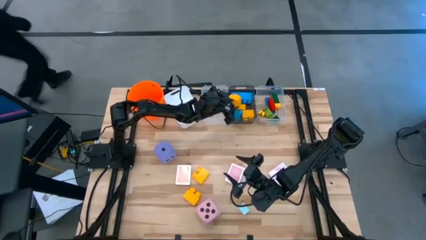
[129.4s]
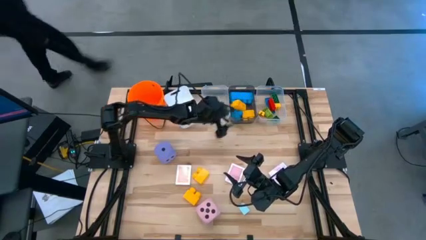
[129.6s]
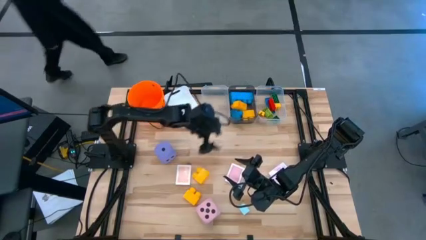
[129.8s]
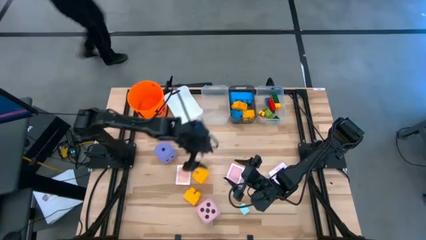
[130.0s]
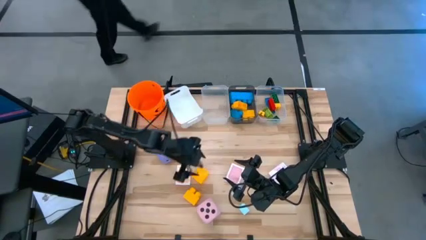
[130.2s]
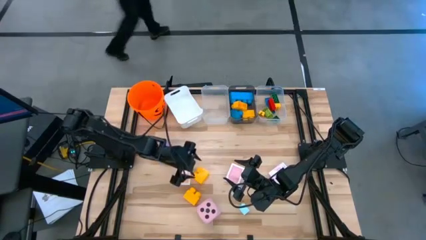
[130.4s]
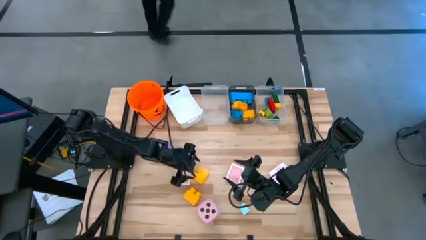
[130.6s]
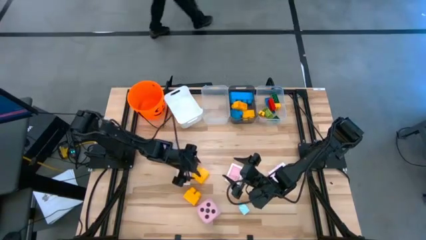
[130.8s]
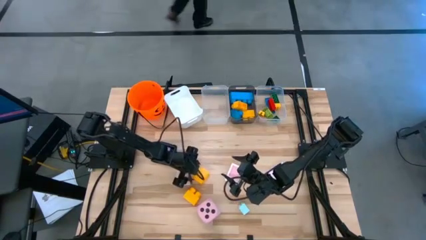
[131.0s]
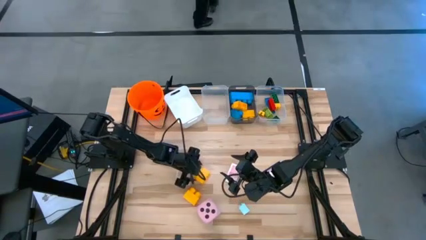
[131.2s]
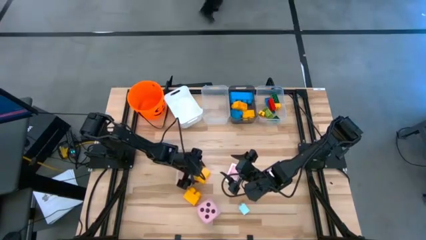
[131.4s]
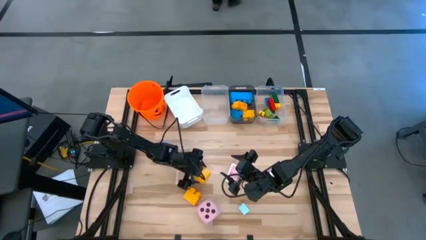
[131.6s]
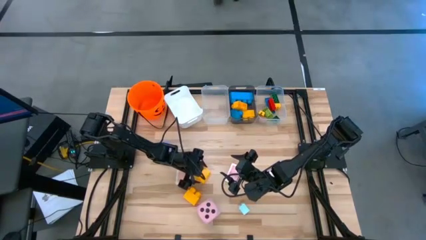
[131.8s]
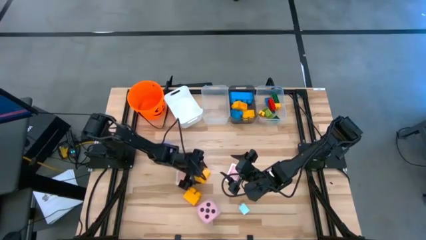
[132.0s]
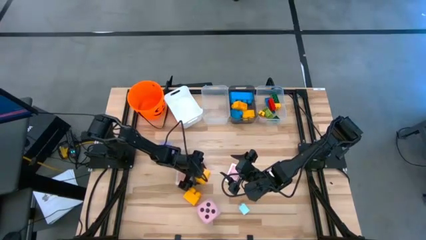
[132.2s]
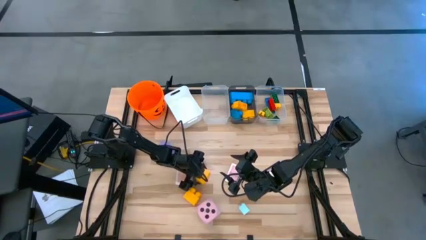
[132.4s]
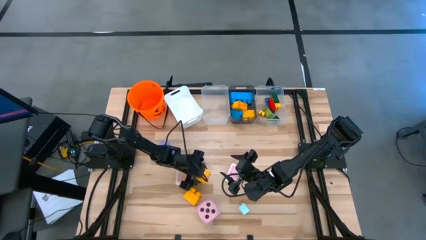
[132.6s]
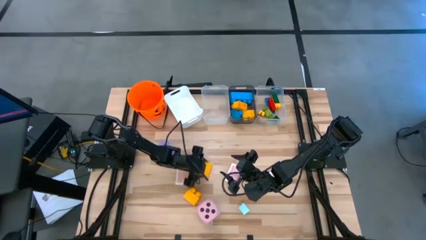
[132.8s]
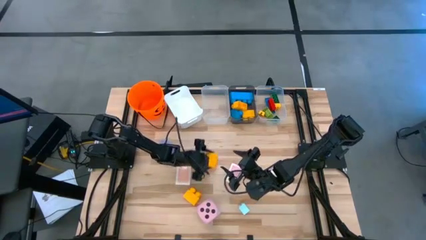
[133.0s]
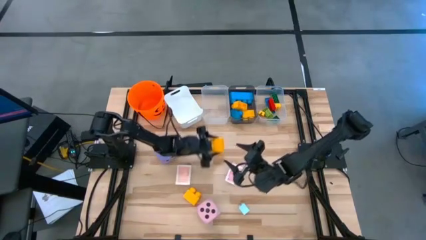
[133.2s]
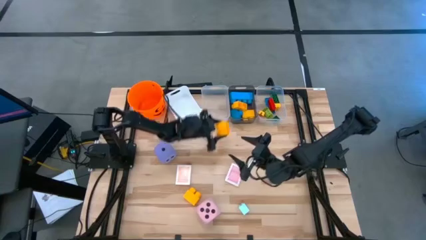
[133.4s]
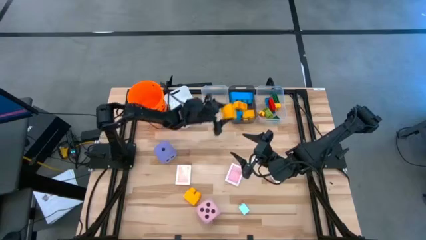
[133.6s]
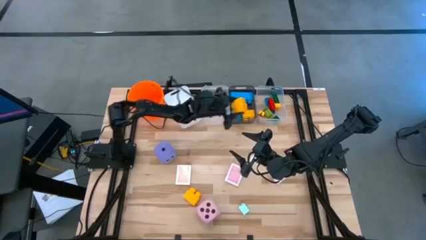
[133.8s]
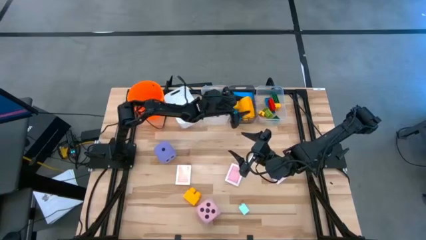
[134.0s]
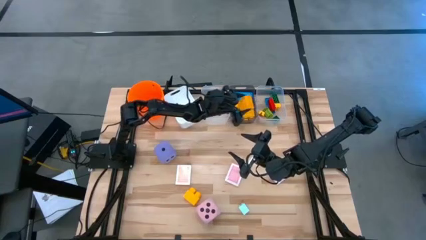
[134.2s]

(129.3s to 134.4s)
Task: Pick & Place Toys
Put the large yellow game piece into the black bin

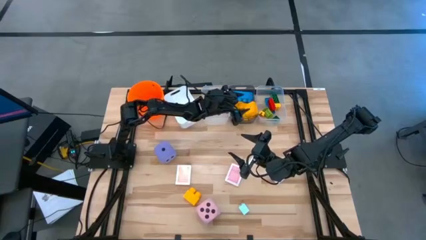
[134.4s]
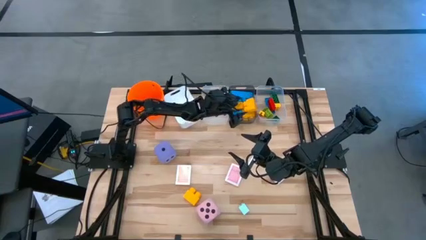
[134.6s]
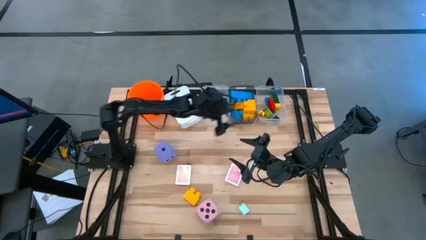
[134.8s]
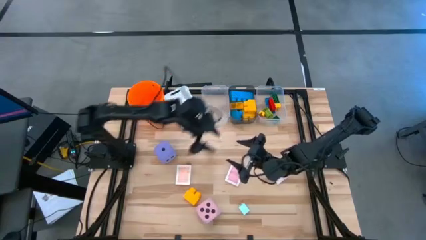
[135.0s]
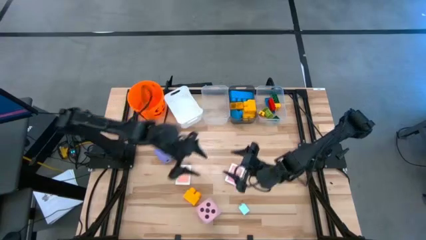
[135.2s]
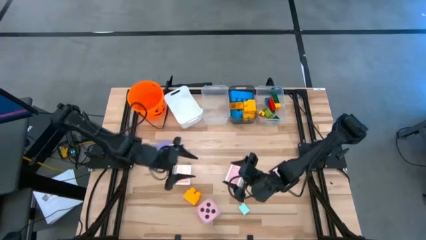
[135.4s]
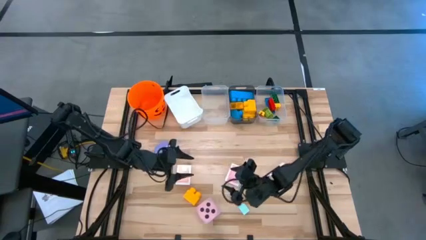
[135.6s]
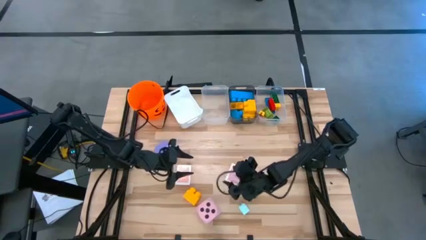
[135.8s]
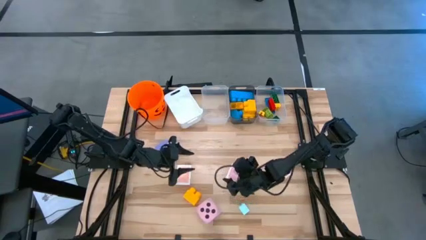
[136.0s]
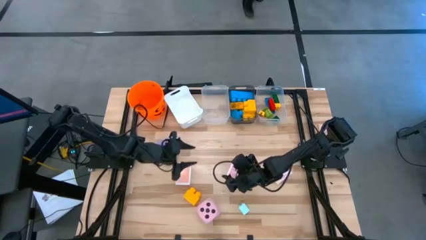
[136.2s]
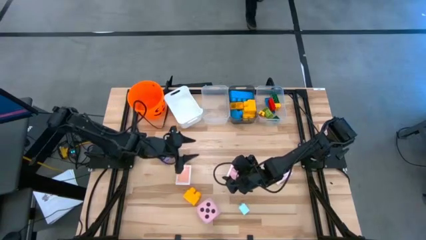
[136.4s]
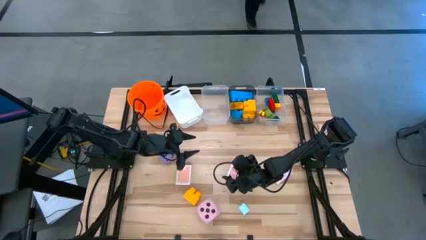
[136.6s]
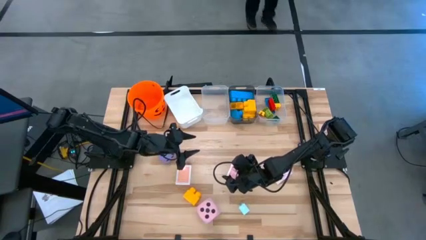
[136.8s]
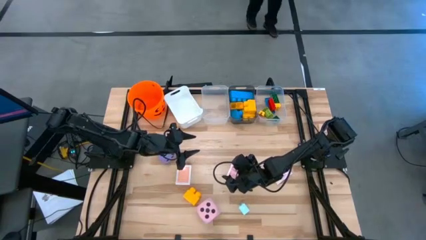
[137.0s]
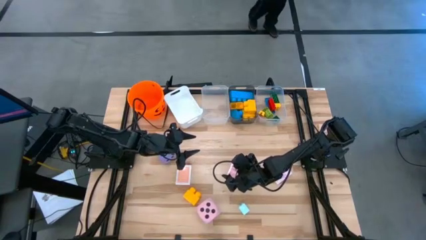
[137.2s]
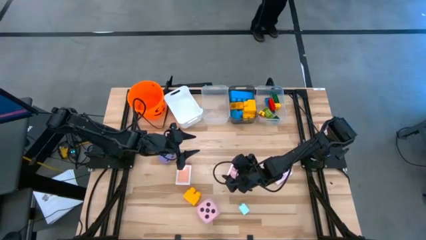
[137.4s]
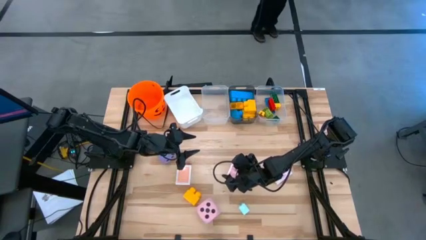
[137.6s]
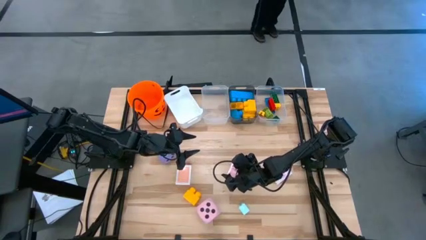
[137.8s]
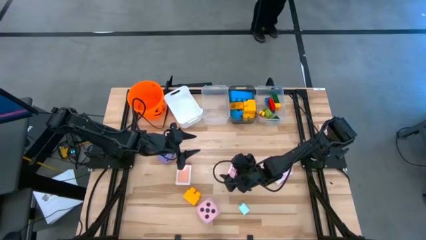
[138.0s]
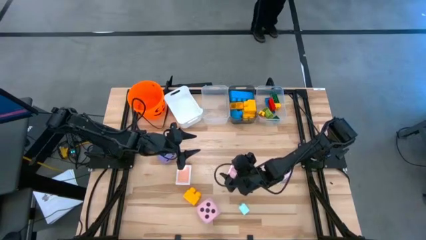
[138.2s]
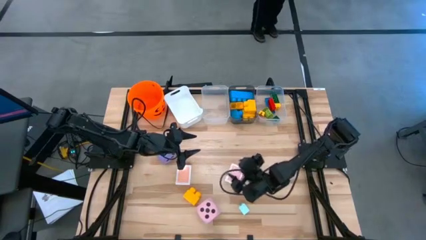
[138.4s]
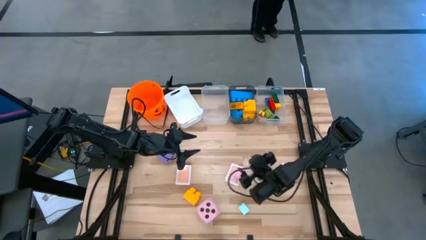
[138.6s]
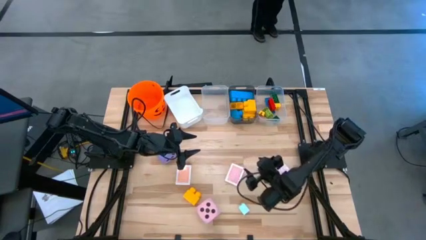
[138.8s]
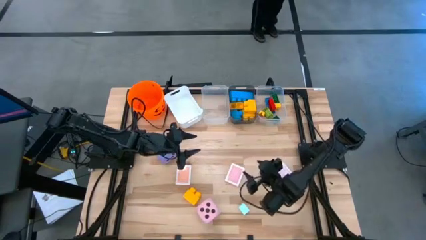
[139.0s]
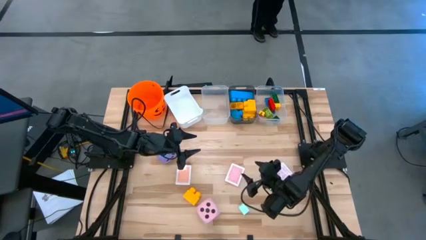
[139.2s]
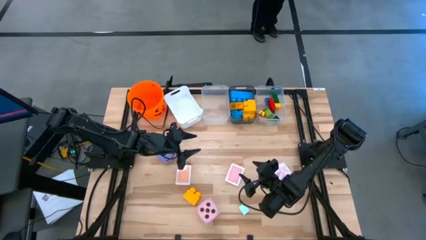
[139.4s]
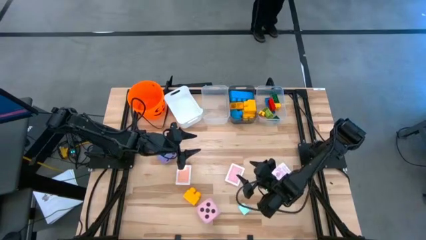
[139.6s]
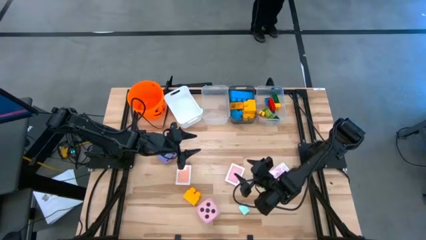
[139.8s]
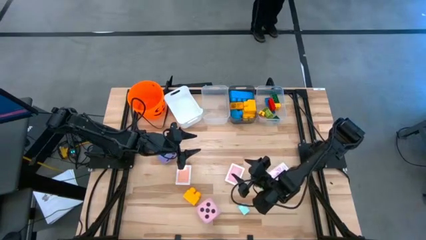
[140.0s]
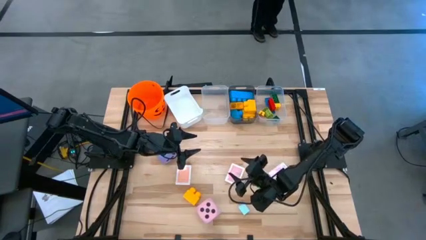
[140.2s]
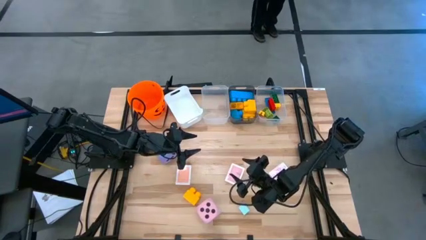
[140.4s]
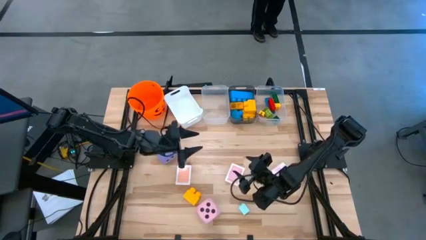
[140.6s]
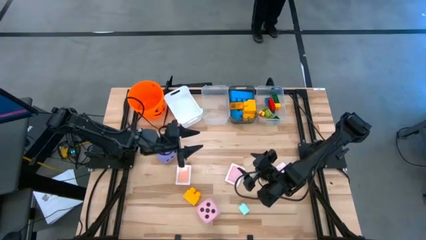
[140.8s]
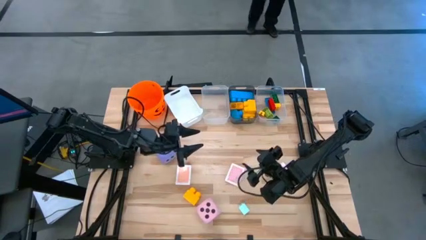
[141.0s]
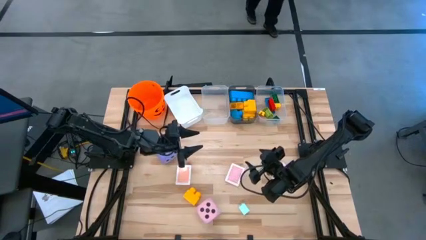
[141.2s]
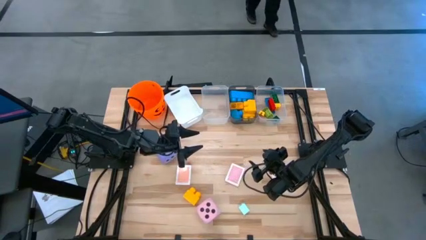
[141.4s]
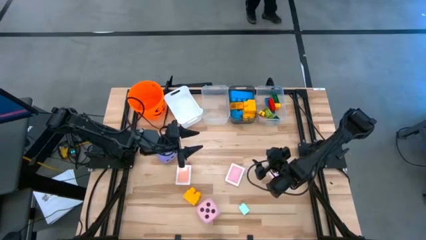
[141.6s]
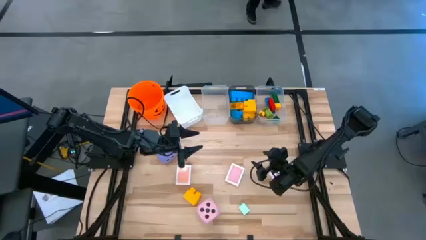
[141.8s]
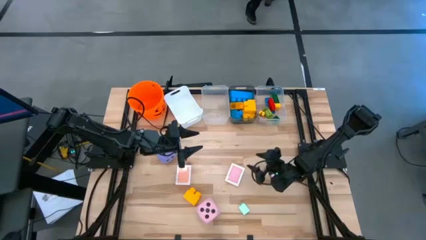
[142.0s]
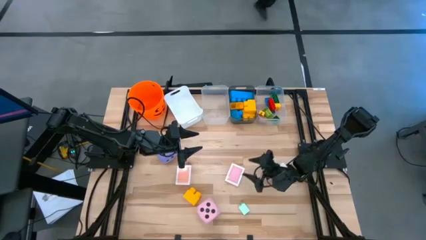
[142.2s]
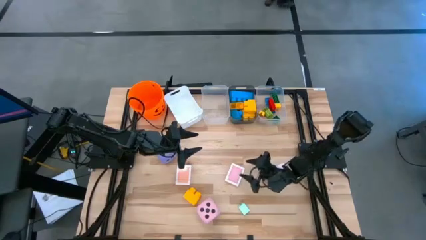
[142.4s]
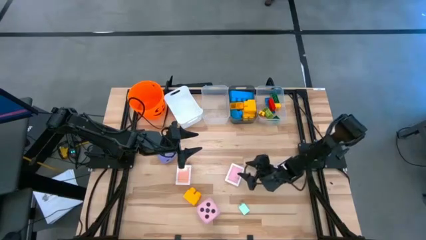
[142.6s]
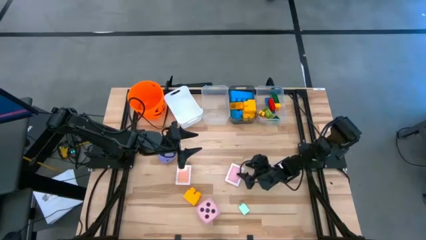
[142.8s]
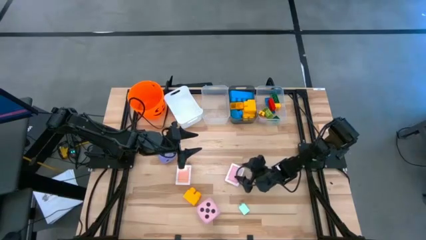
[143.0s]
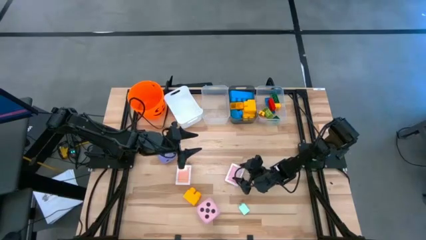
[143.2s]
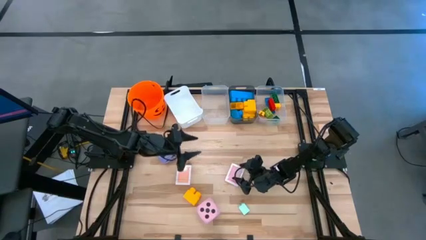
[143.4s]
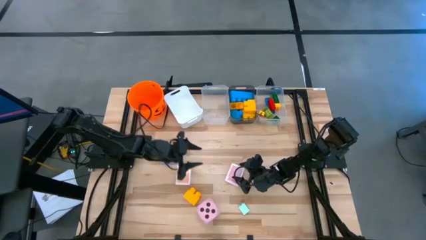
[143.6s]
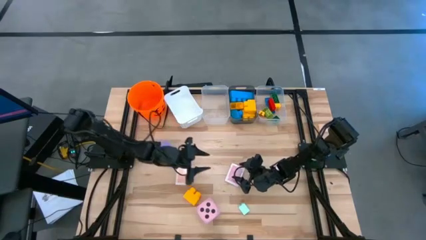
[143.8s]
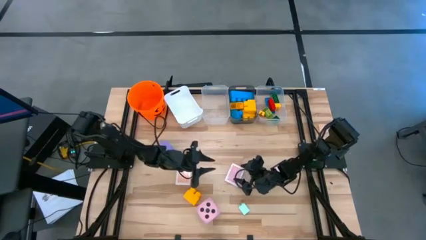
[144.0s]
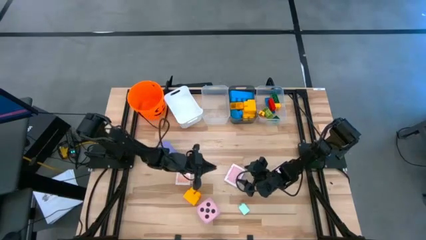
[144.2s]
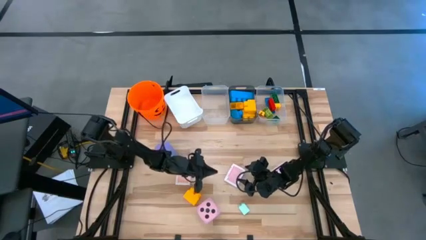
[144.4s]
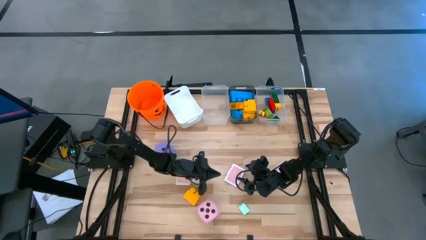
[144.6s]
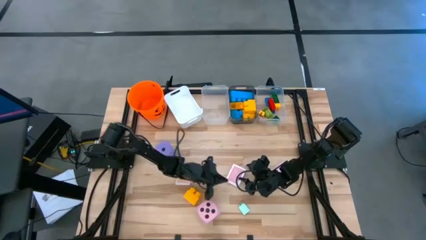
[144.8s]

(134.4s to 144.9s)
Put the red deck of cards into the left transparent bin

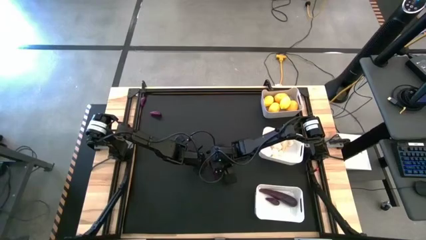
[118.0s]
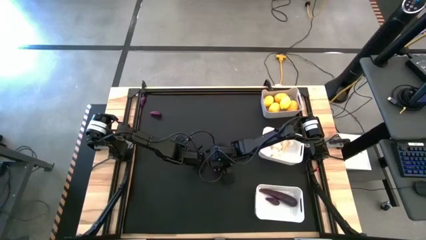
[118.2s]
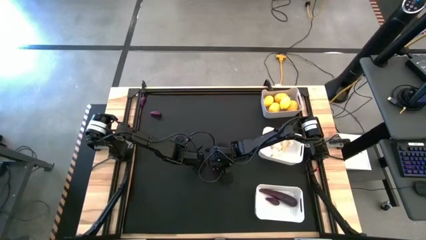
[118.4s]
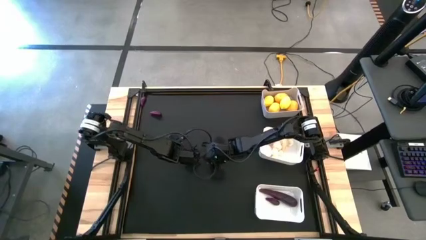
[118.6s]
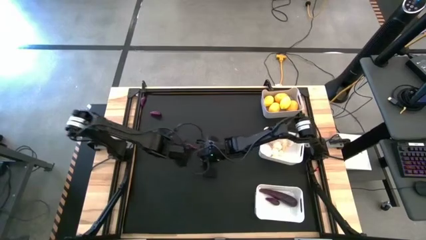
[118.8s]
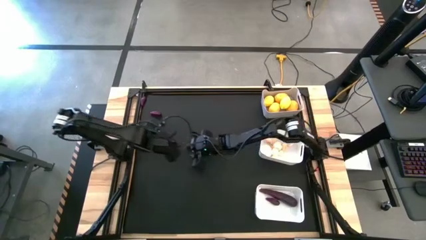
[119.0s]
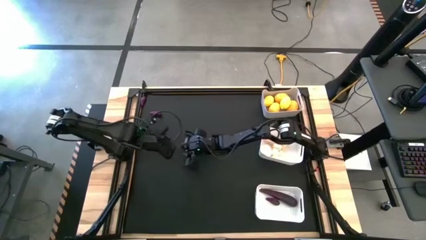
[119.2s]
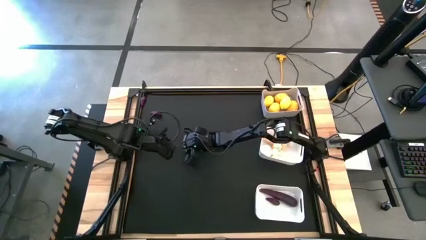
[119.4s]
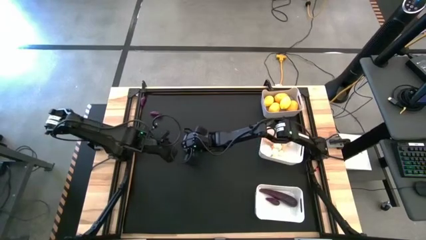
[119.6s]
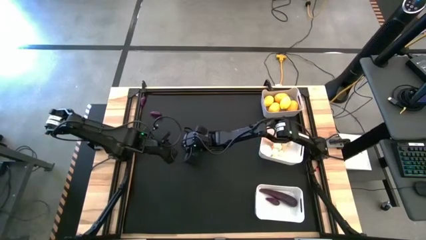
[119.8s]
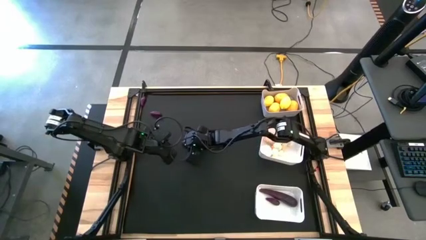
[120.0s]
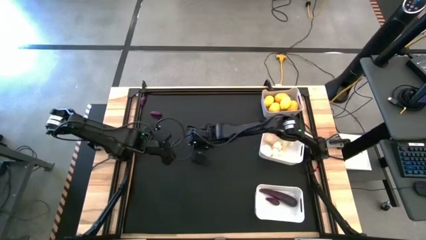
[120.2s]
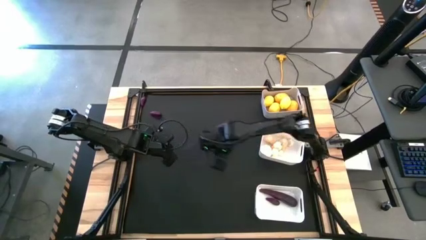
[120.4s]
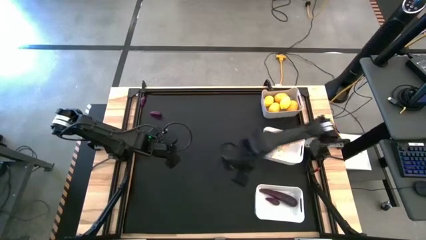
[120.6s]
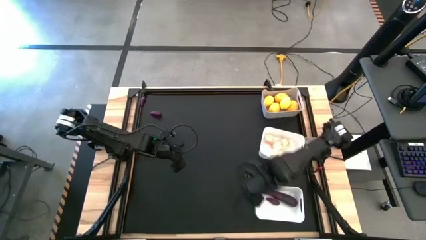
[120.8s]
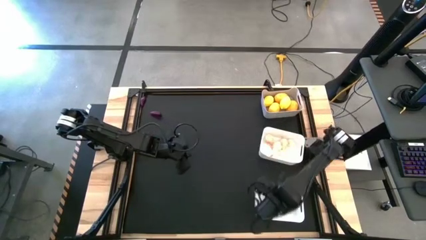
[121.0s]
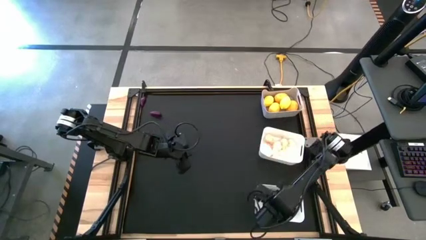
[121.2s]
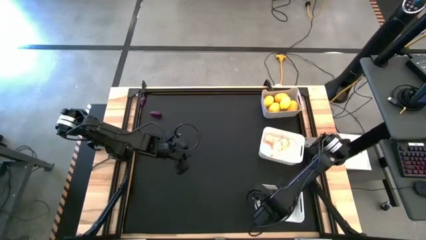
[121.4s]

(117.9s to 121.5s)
Task: Sort produce into baskets
Put the eggplant into the bottom white bin
